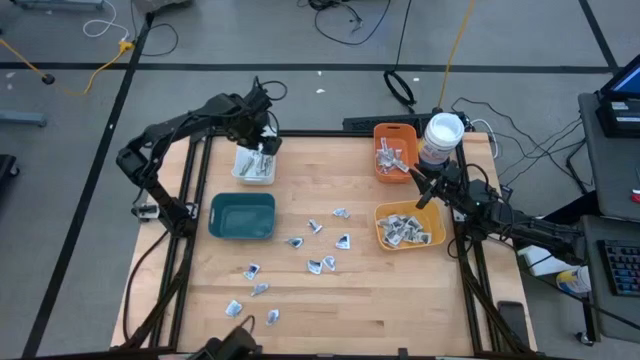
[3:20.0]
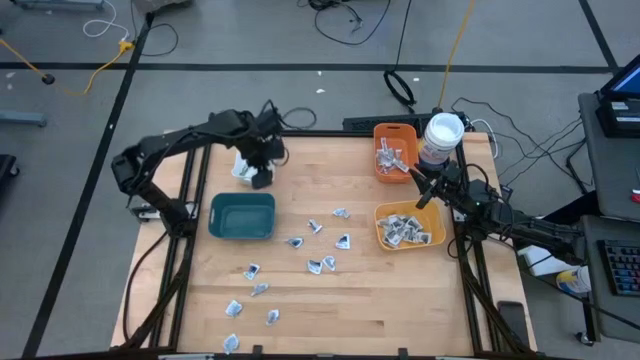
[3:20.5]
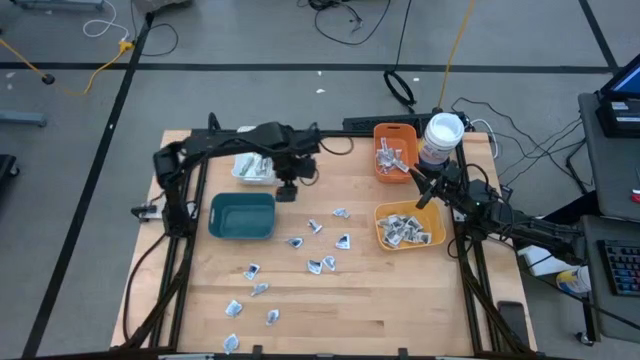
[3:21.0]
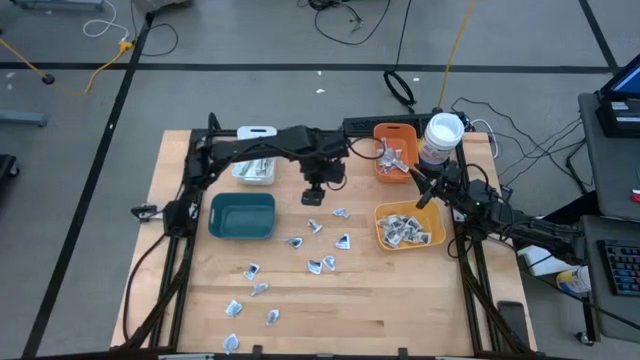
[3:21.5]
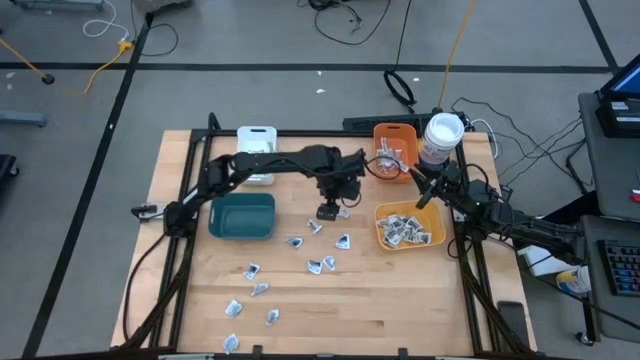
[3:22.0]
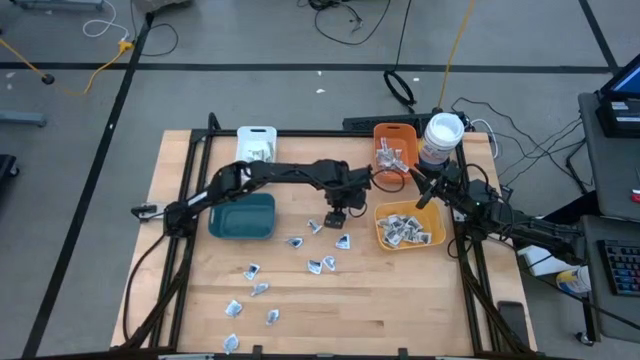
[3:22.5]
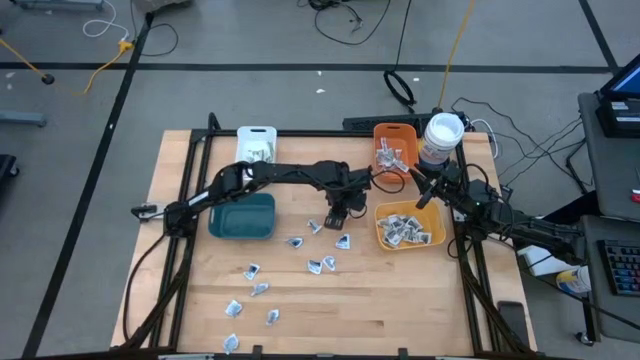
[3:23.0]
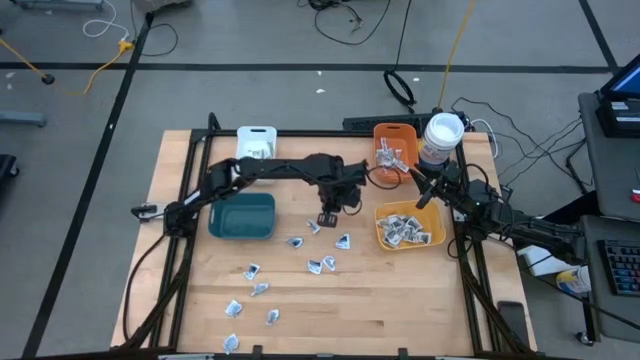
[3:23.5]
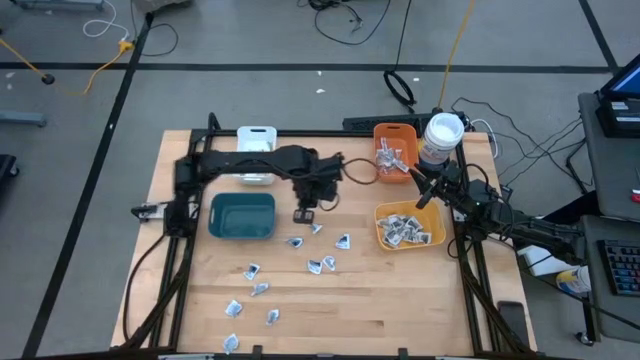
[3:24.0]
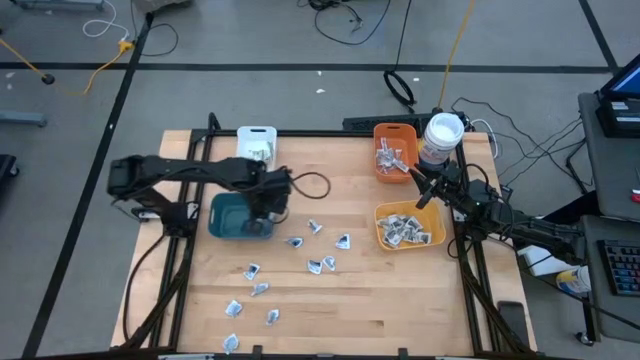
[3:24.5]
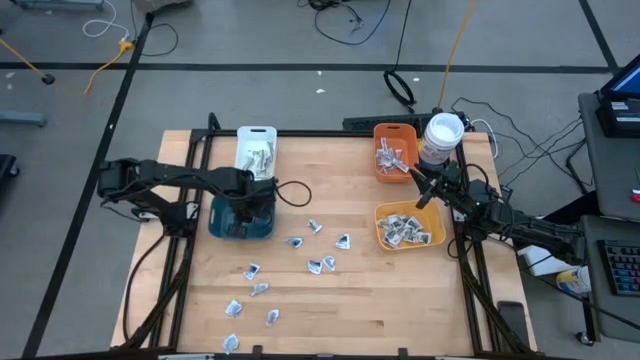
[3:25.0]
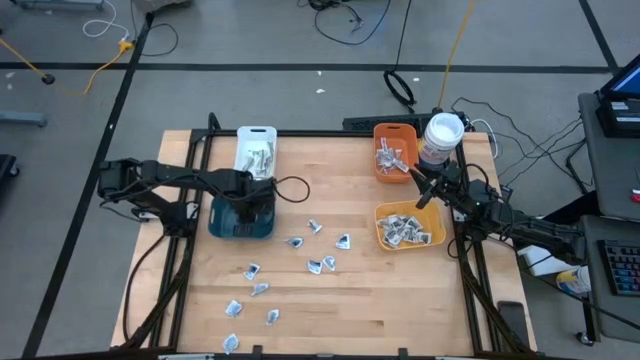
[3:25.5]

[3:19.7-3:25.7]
Task: Pick & Place First Aid Supplies
Put the alcohol pad into the blue bin

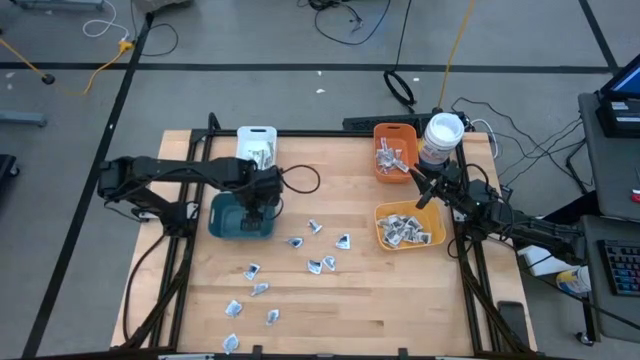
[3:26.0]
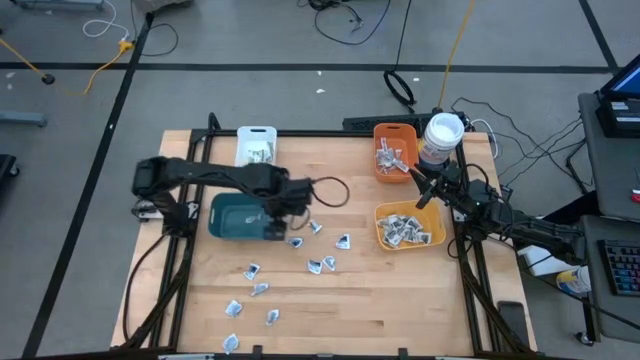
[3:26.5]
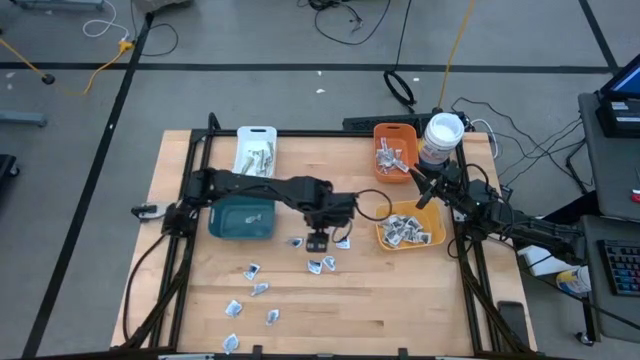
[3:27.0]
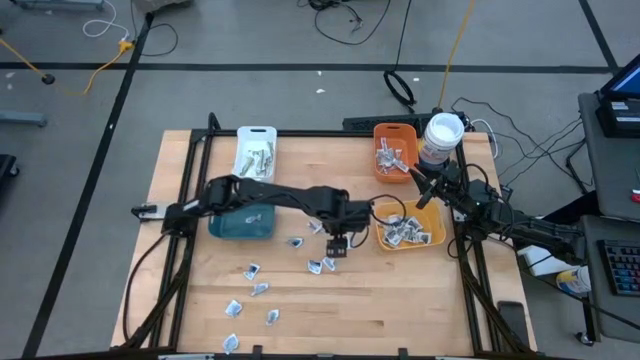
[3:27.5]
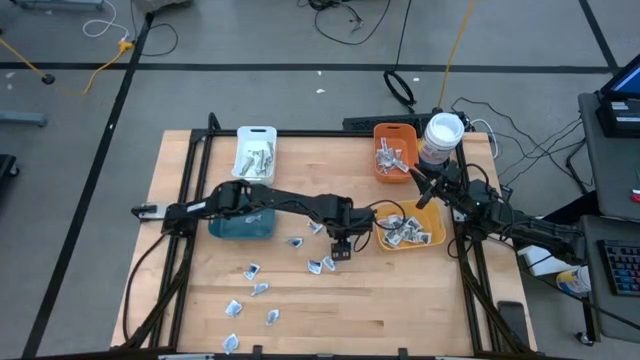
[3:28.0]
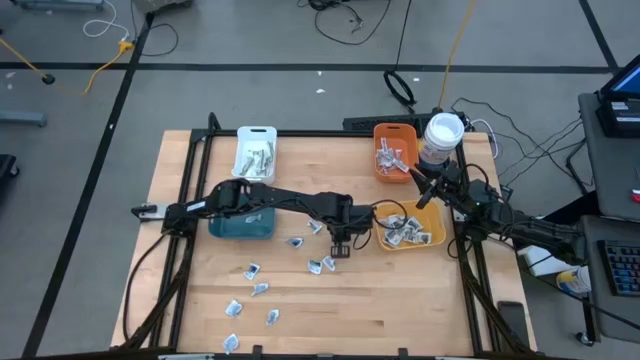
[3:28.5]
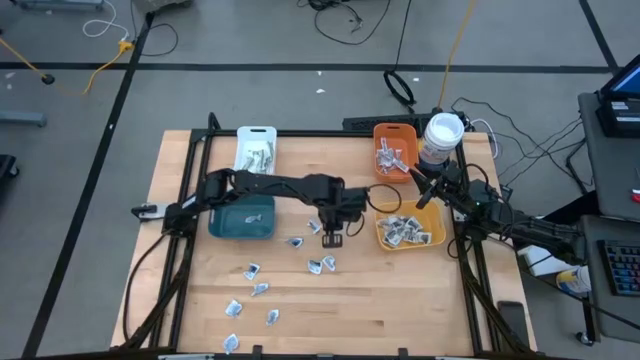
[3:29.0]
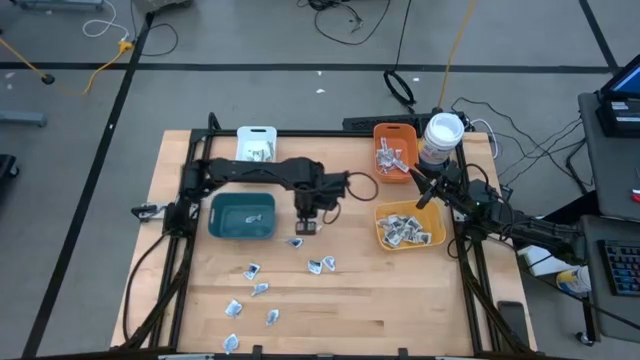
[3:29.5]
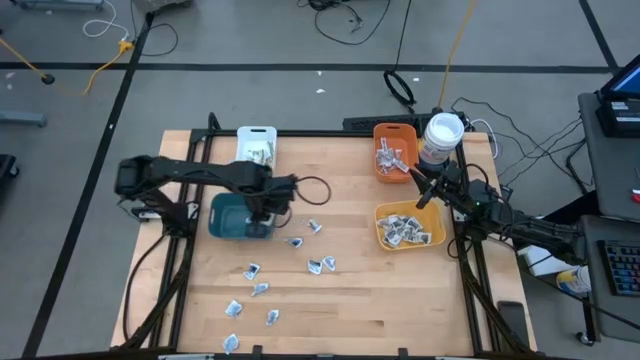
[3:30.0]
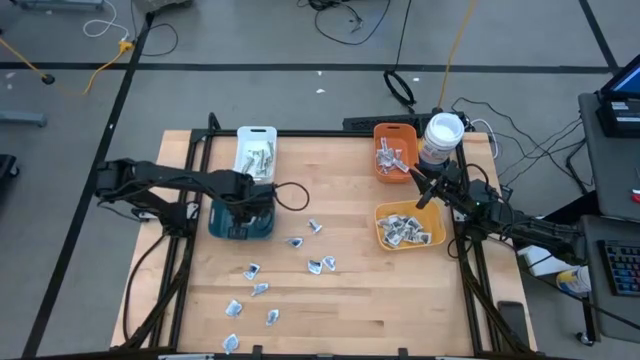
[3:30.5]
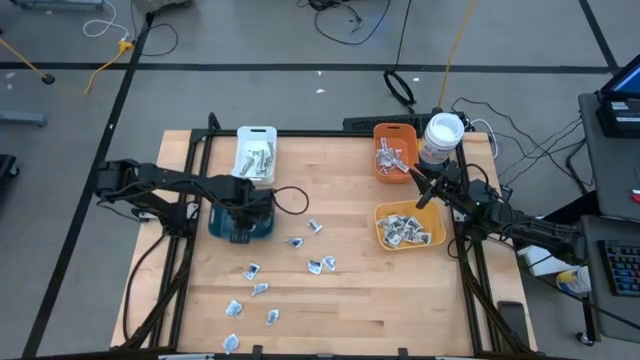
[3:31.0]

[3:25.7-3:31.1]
Put the alcohol pad into the blue bin

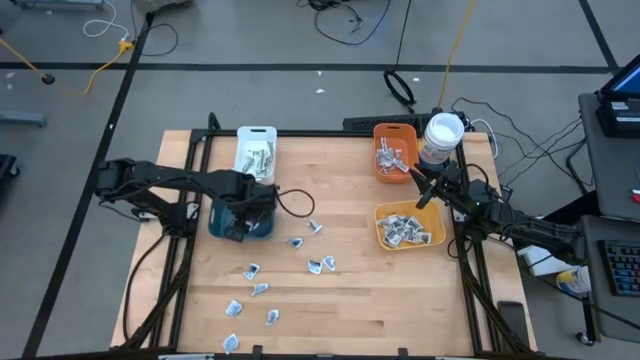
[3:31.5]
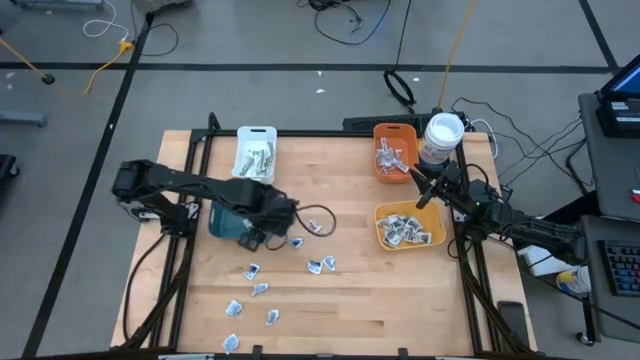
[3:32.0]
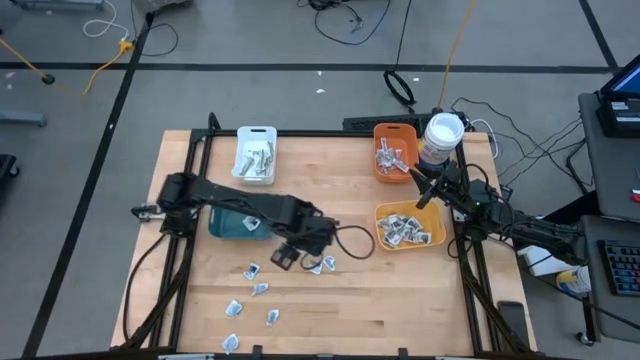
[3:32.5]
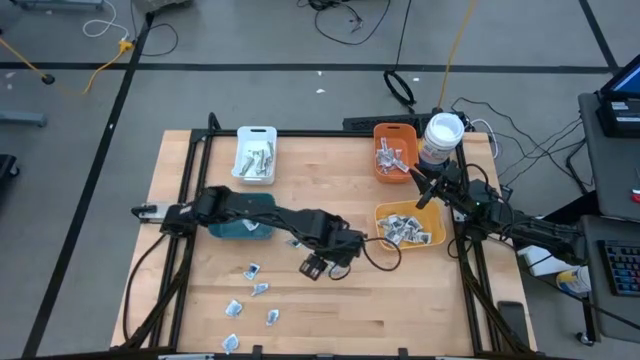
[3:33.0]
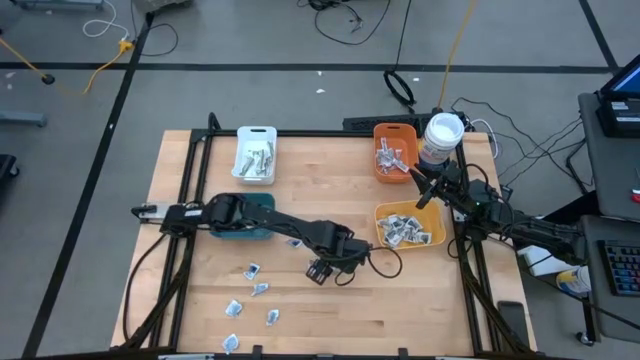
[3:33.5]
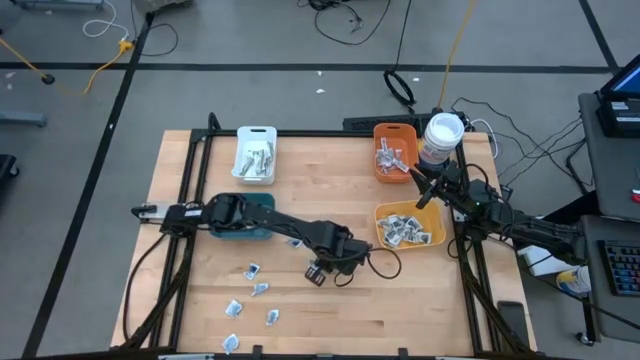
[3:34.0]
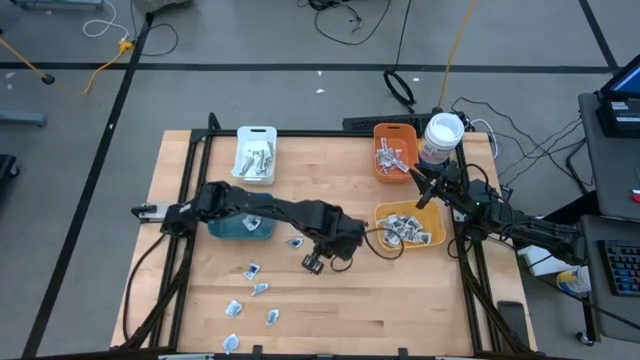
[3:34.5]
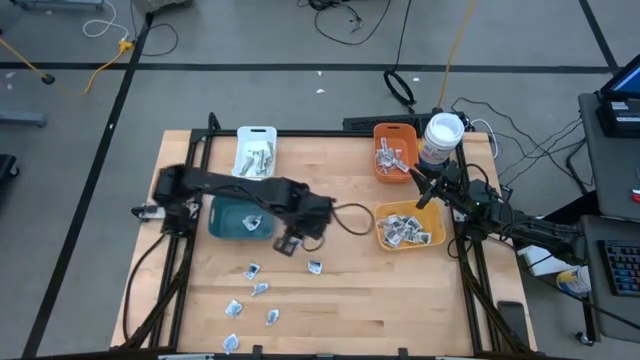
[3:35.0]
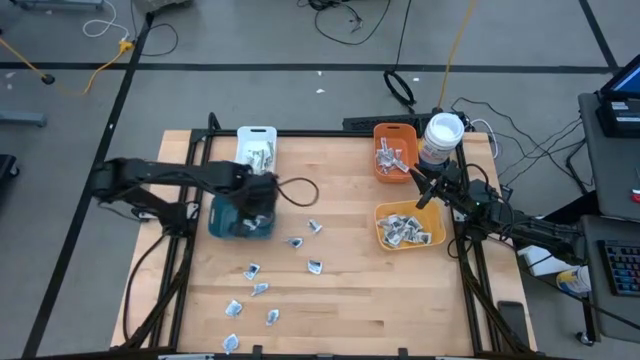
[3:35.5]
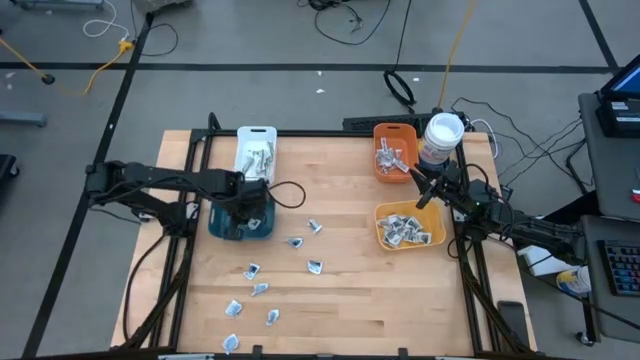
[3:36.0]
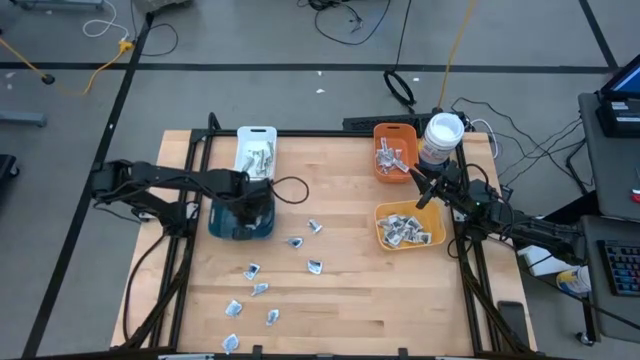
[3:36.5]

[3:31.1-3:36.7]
Put the alcohol pad into the blue bin

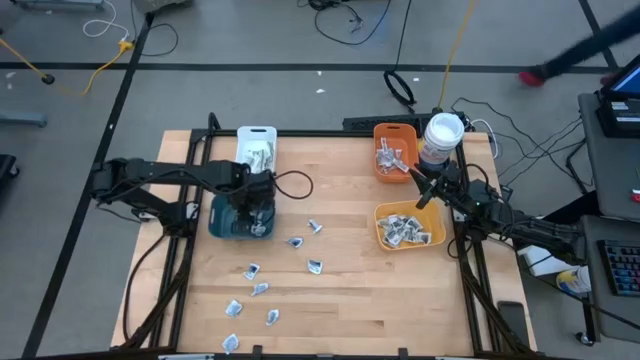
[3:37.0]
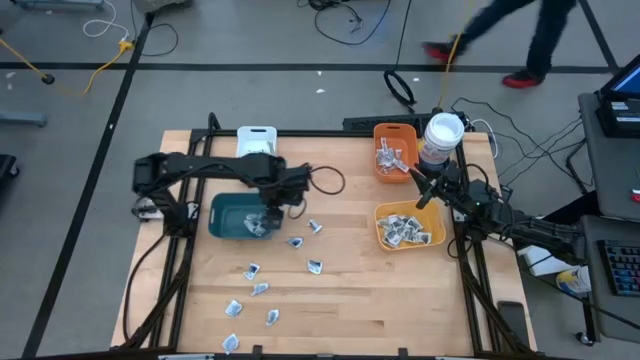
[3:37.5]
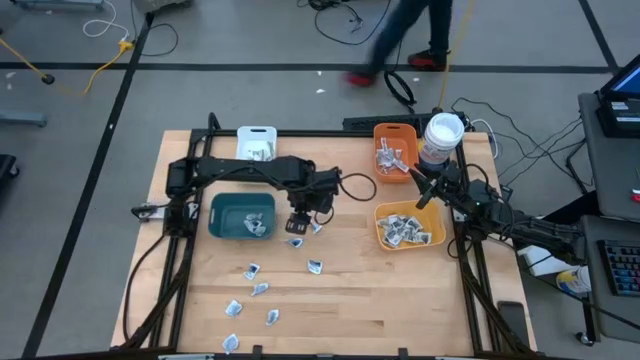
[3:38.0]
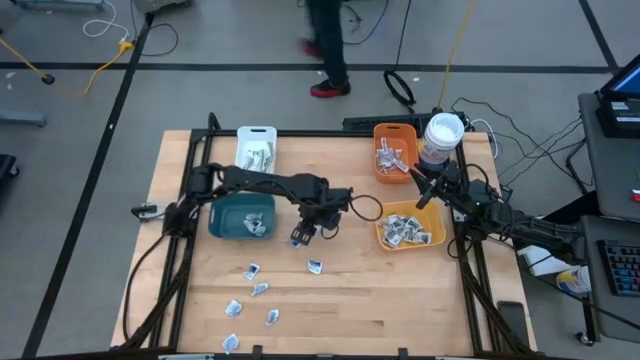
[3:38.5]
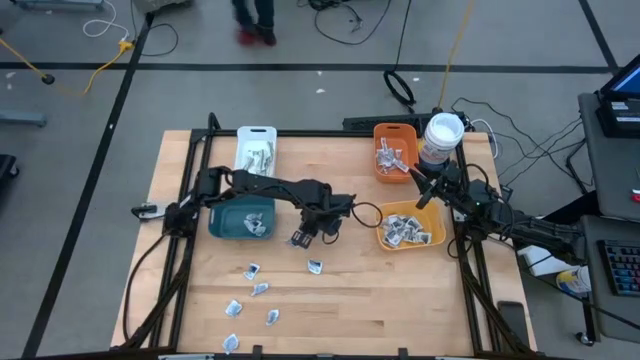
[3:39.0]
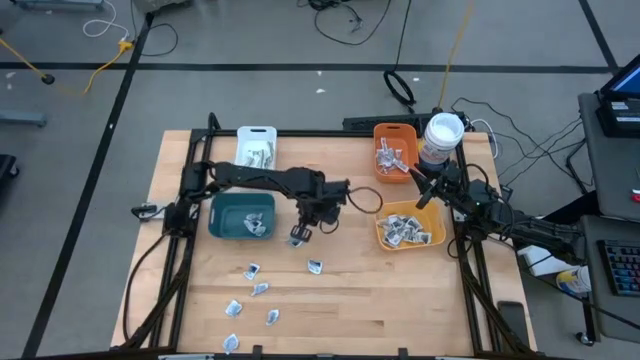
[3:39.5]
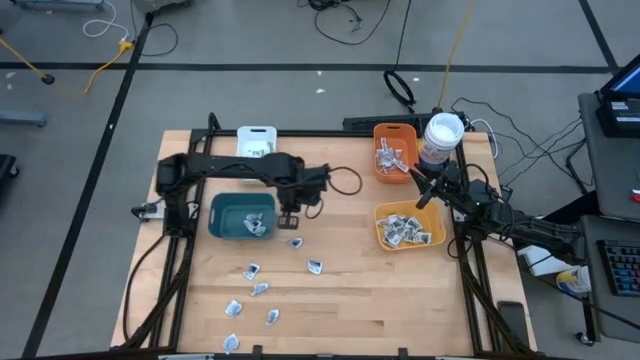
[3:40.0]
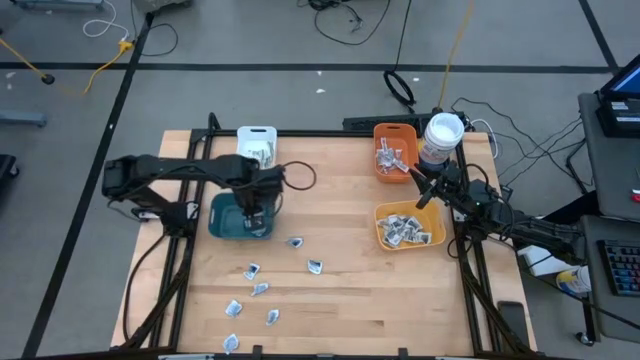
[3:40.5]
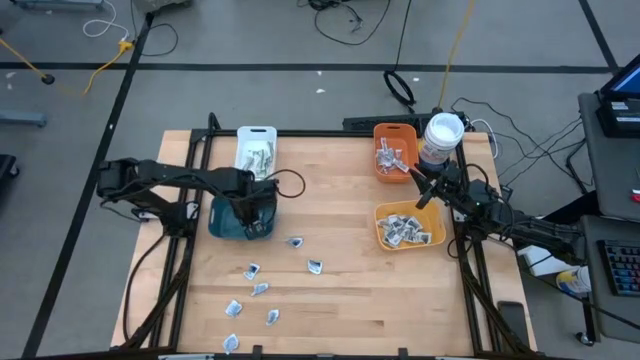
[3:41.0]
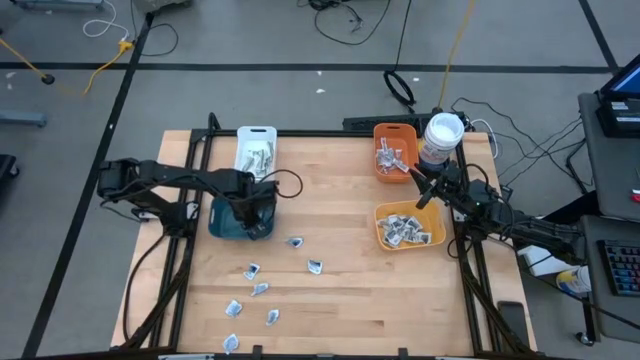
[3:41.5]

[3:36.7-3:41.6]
Put the alcohol pad into the blue bin
